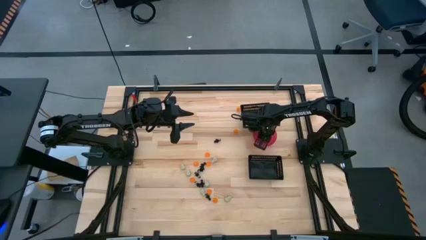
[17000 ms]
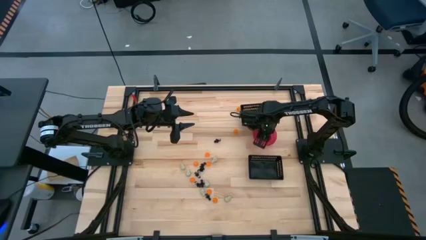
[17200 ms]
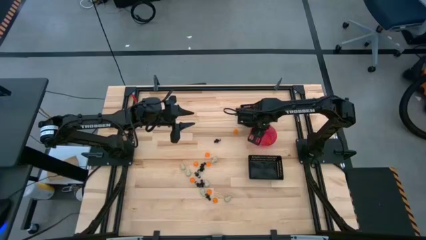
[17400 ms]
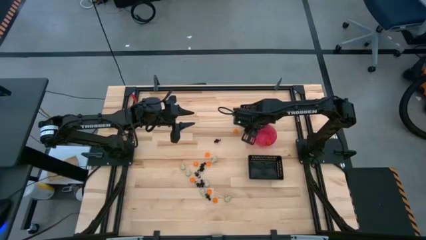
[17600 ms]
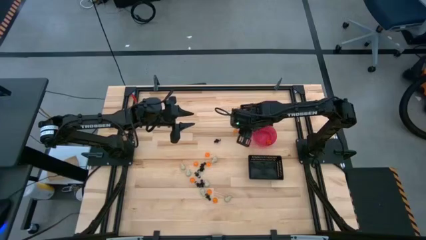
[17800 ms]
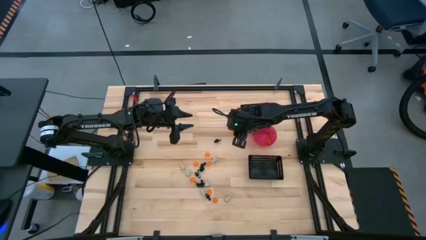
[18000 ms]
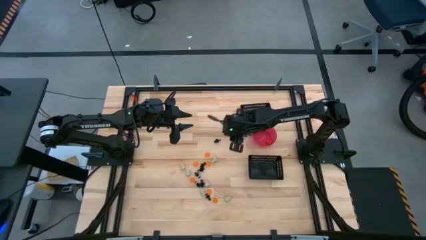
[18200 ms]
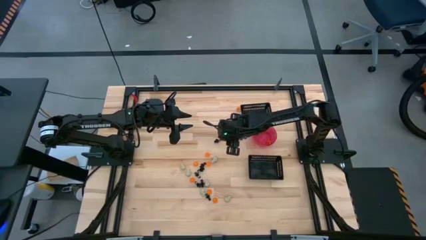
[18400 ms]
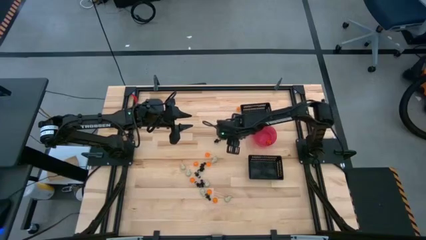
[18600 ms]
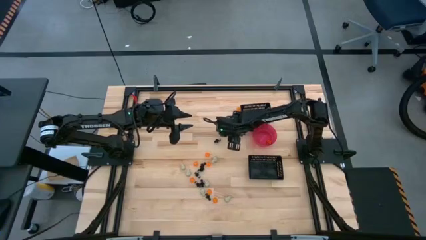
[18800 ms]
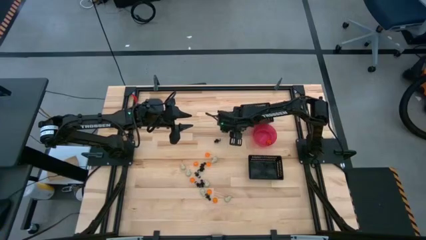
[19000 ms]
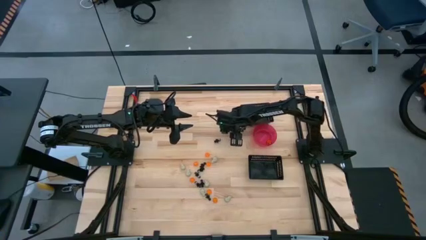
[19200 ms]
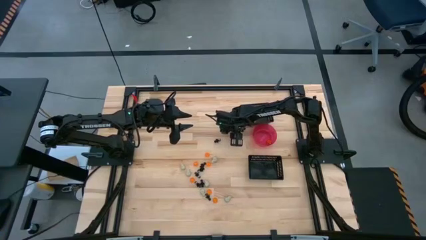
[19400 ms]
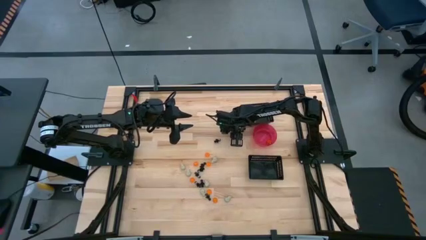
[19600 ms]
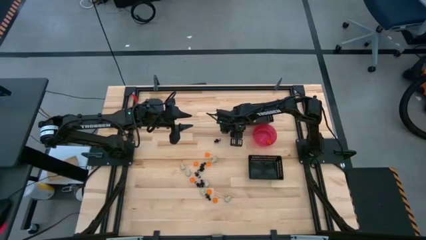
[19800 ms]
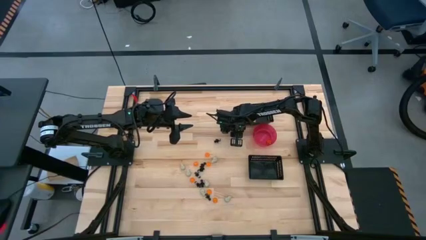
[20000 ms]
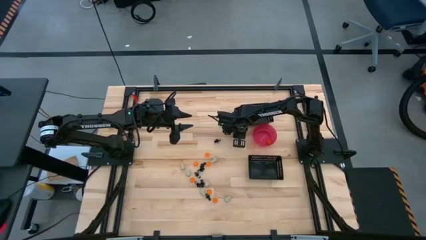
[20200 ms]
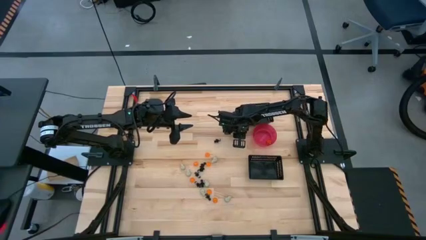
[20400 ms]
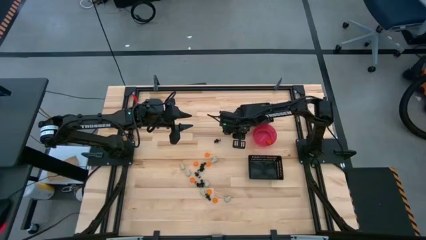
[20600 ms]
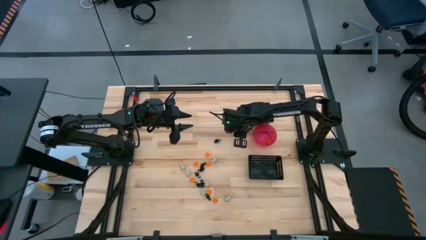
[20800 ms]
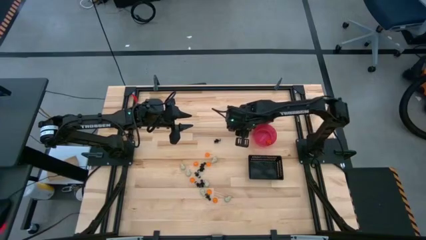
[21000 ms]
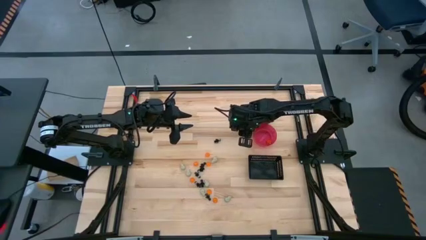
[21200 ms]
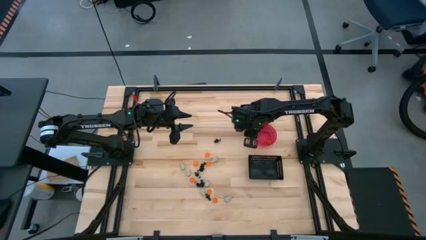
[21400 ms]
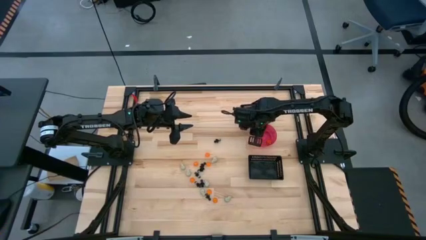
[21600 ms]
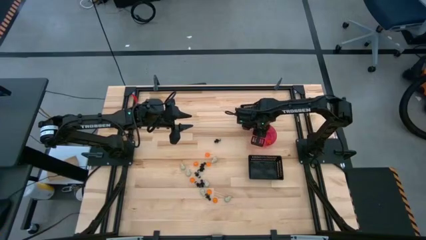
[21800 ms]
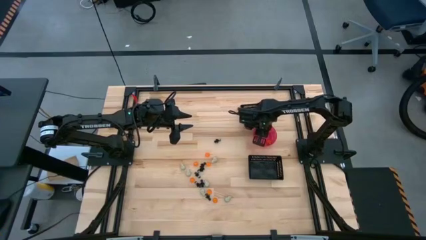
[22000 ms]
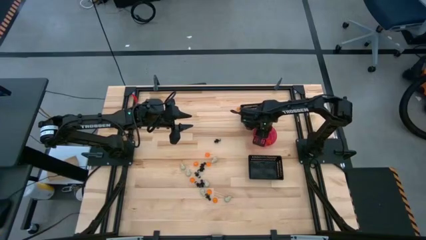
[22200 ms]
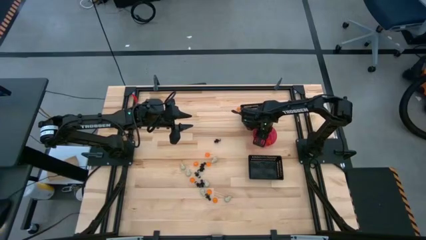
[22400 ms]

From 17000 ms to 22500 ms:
Task: Sort Halloween decoration
Put the orange pumpkin toy into the pink bowl

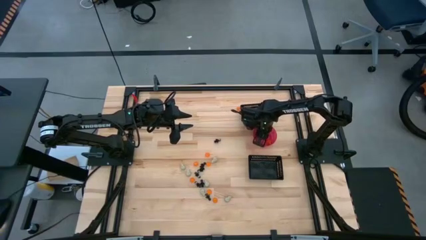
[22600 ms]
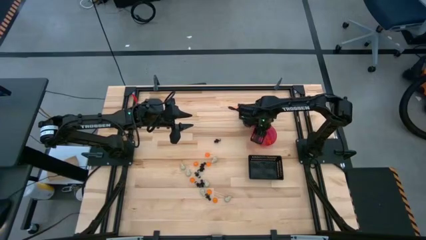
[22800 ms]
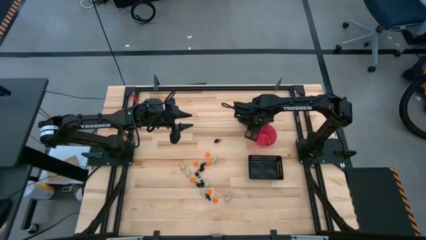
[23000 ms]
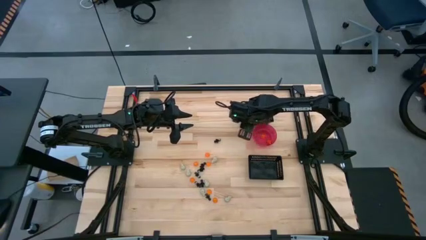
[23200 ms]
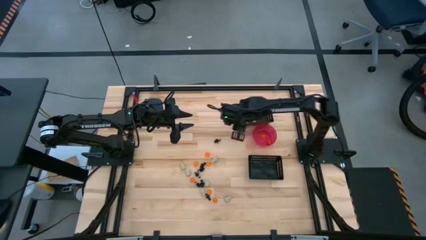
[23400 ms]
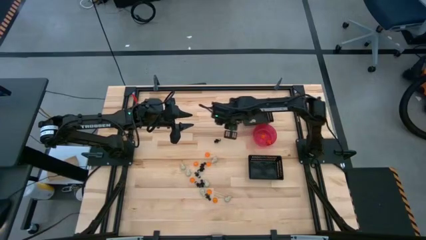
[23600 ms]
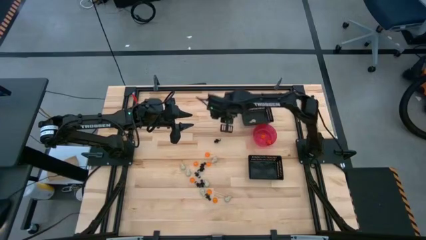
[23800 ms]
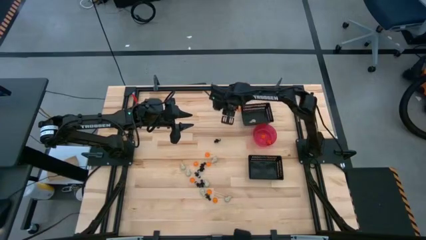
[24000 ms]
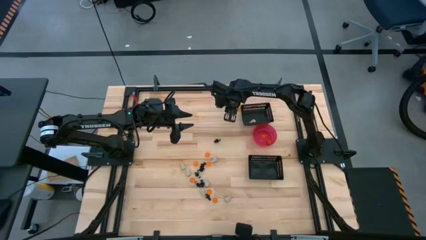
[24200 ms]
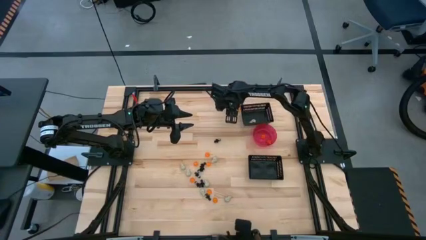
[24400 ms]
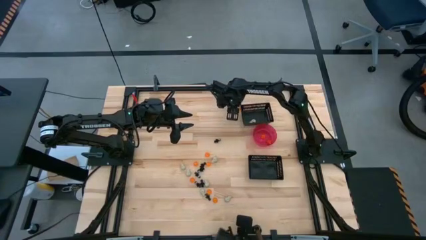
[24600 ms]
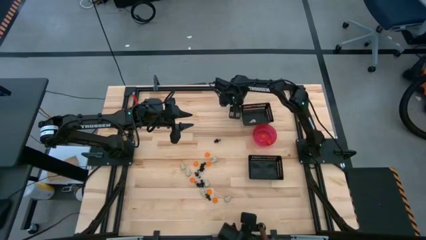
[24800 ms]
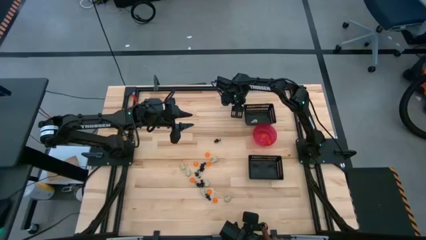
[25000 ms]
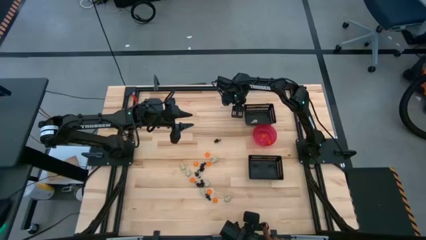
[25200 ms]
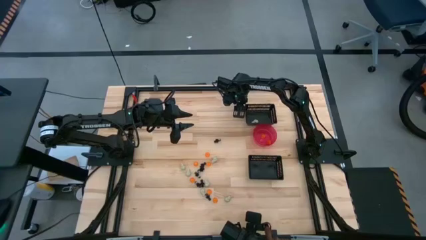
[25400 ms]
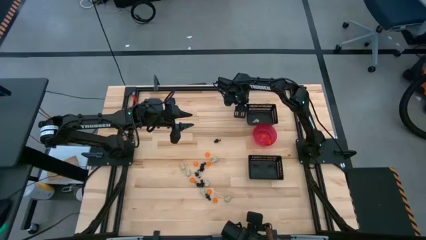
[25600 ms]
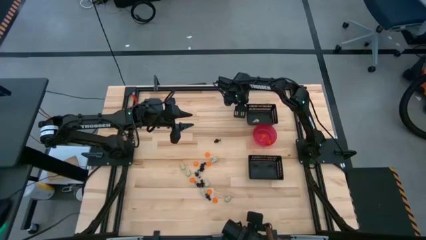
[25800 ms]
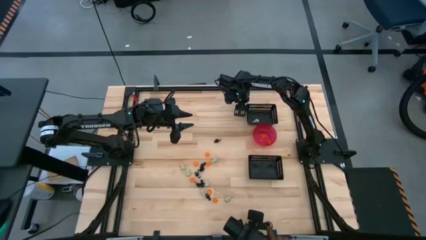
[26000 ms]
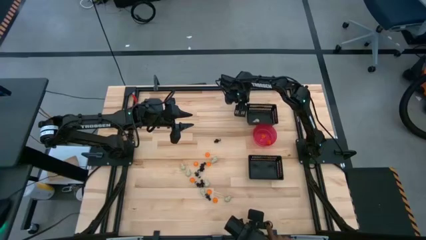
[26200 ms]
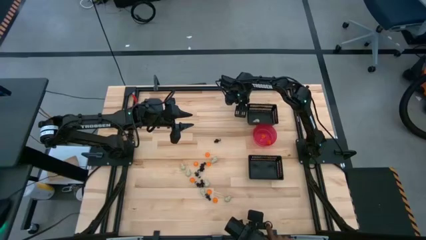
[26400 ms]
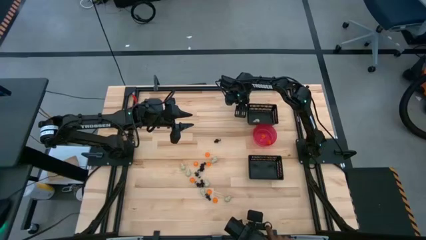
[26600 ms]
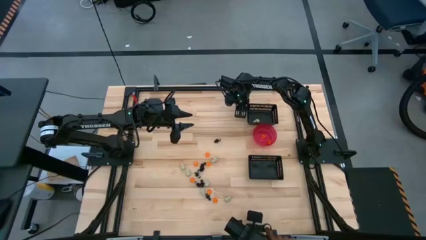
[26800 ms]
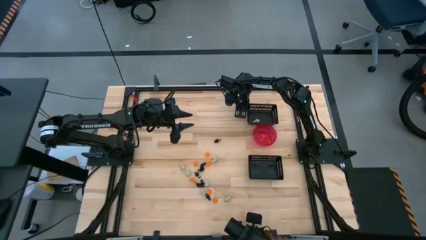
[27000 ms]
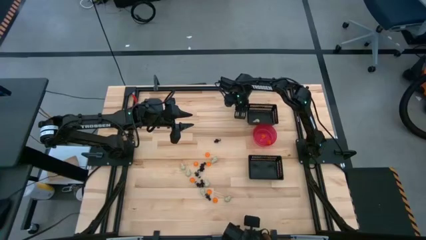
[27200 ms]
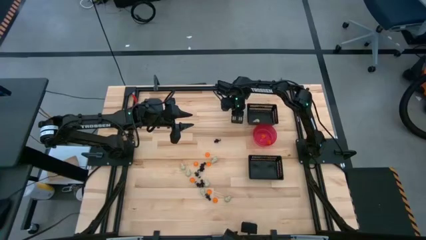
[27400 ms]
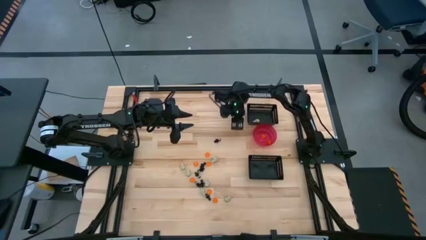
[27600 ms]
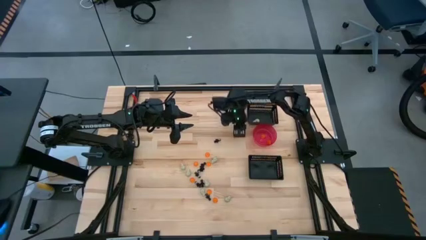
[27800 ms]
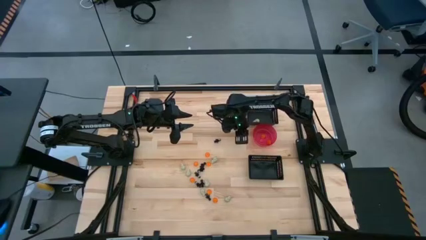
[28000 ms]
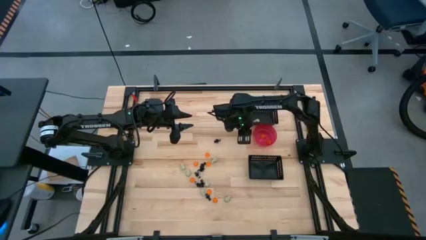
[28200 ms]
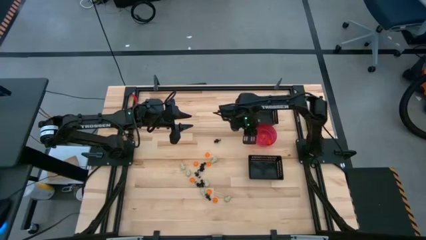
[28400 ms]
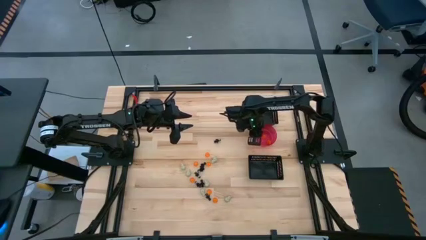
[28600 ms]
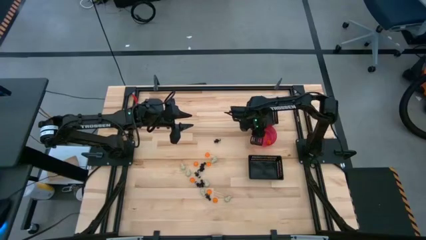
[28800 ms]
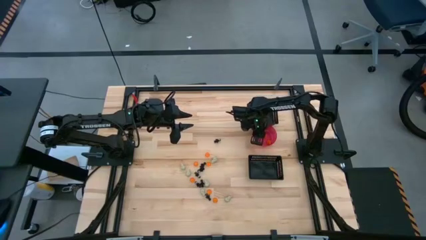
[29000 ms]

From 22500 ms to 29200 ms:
Put the orange pumpkin toy into the pink bowl

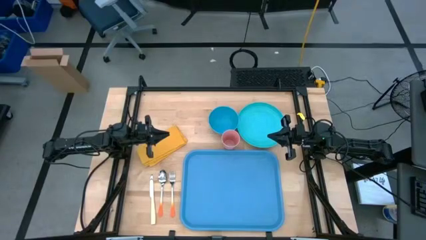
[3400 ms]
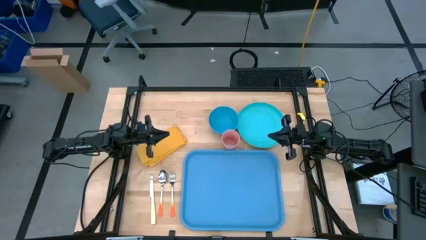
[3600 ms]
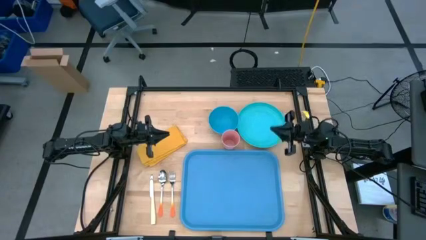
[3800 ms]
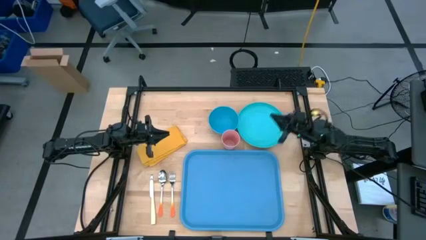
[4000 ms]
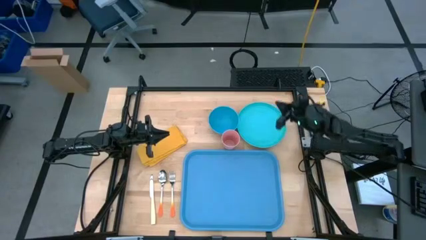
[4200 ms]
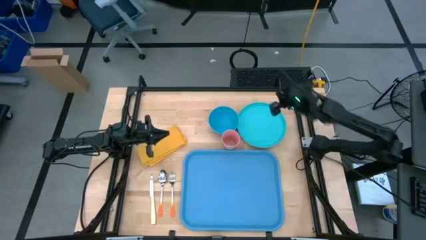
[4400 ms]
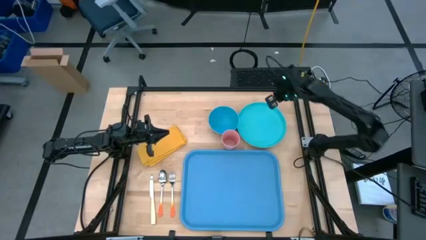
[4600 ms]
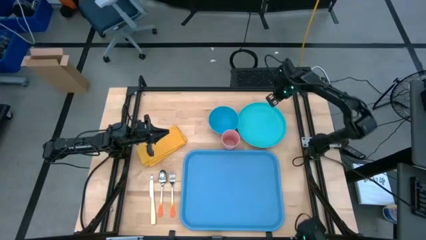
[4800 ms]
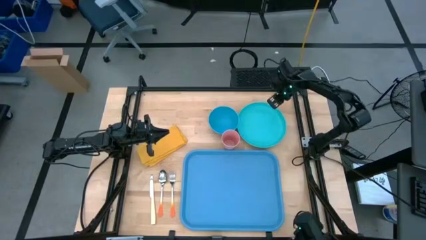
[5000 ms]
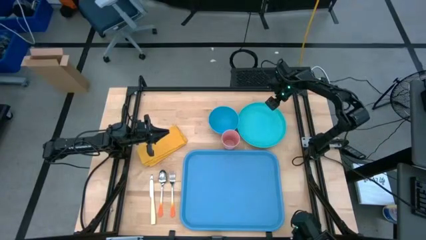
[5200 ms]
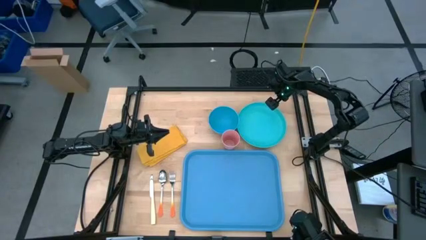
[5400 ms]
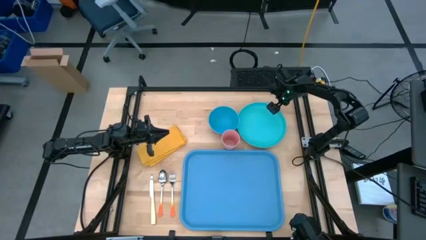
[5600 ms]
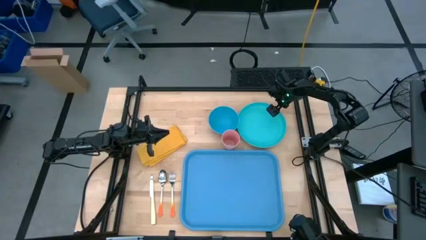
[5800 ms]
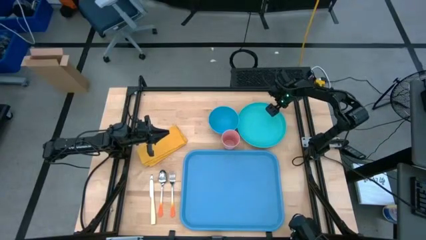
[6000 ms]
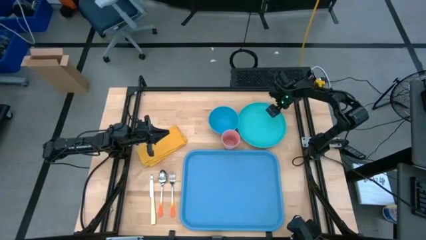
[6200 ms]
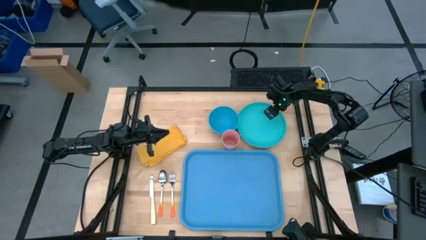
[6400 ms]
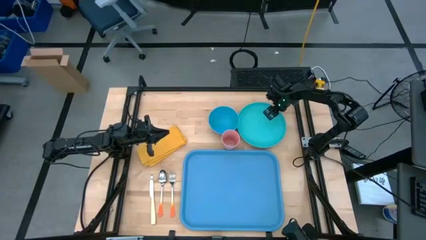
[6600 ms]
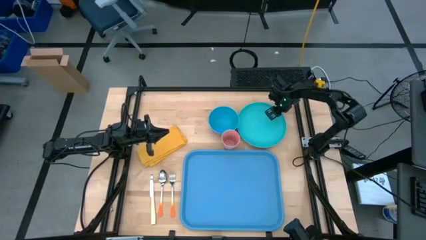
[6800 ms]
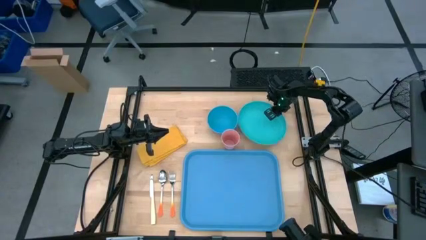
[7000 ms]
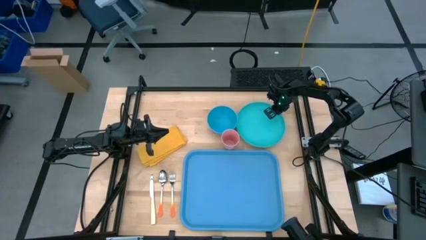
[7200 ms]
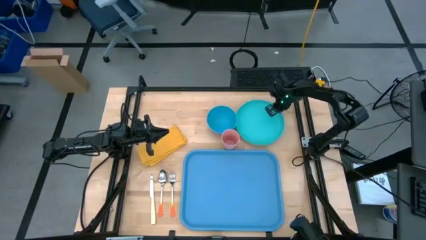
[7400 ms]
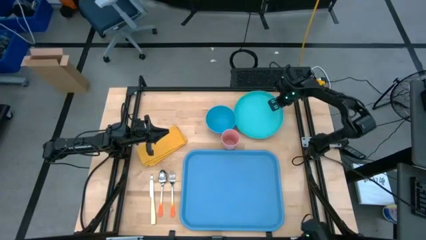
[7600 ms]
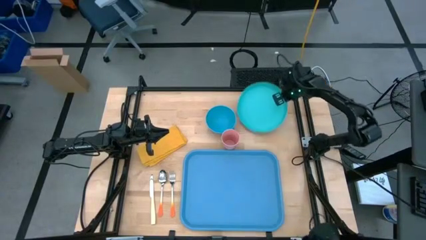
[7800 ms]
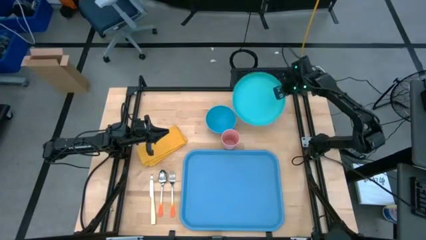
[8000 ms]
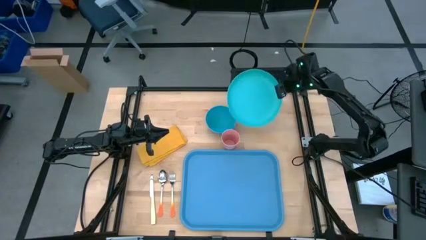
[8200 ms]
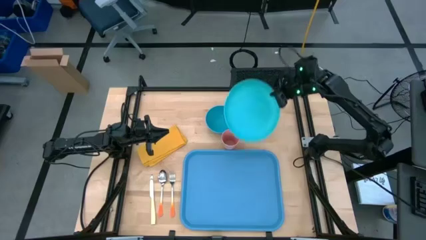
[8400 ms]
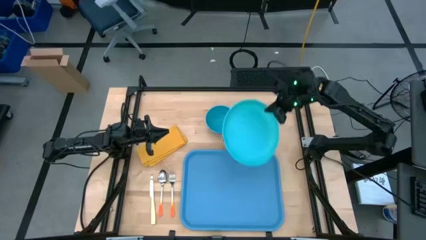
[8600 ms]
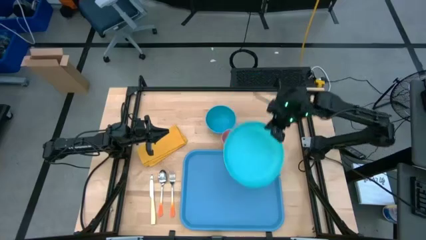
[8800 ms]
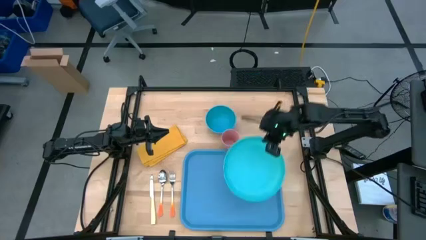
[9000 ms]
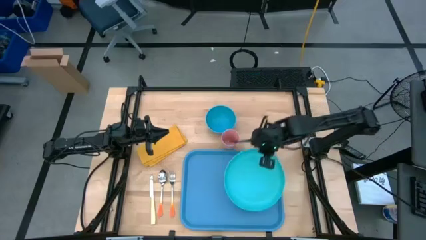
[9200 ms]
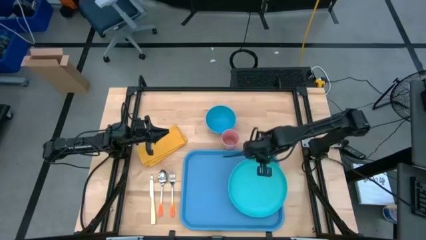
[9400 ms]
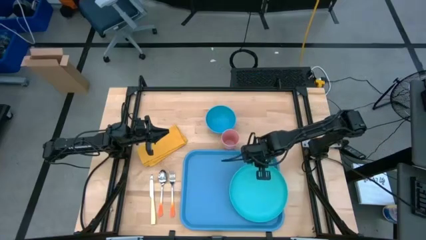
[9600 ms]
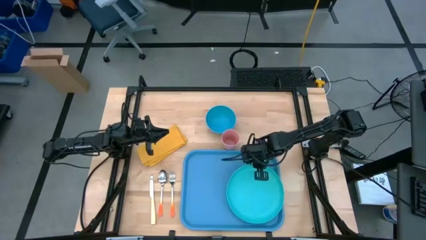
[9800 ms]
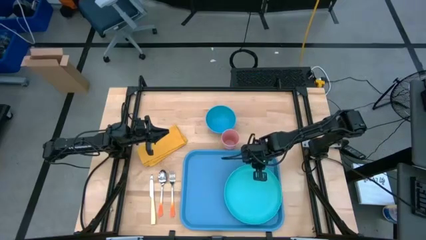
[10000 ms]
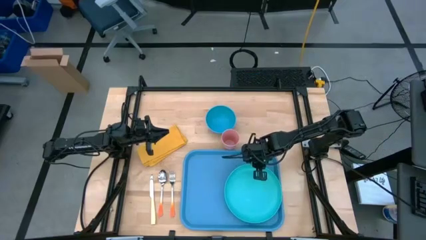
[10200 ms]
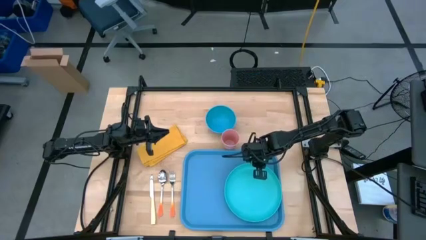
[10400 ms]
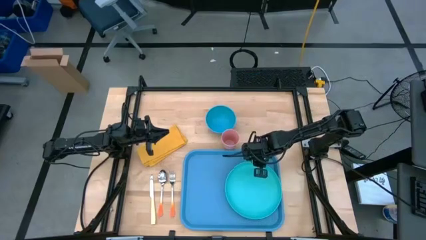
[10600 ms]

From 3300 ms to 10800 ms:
Task: Set up tray
Put the blue plate on the blue serving tray
